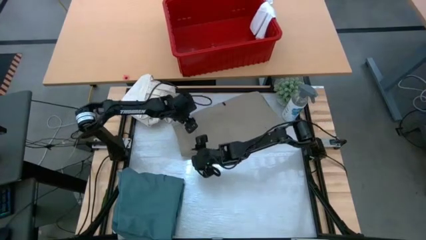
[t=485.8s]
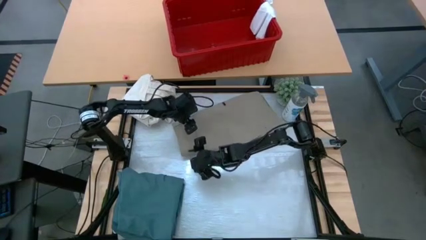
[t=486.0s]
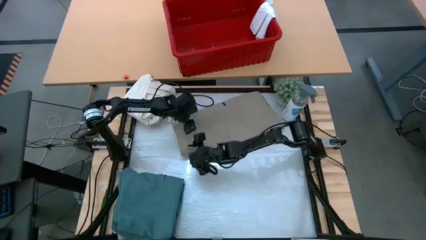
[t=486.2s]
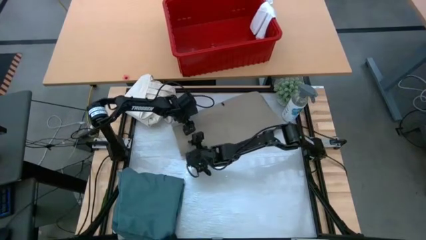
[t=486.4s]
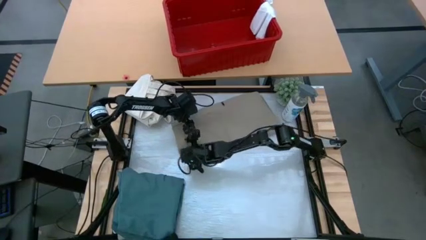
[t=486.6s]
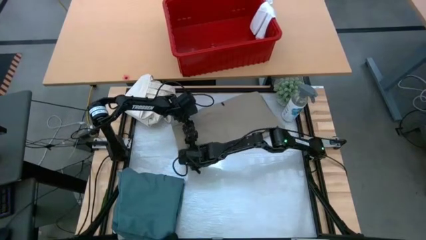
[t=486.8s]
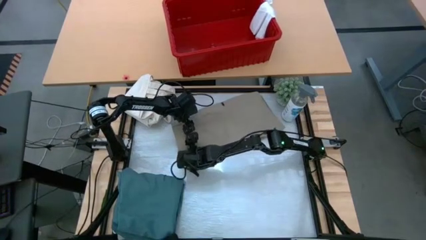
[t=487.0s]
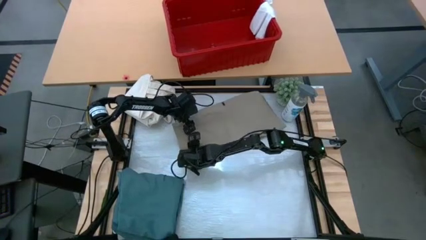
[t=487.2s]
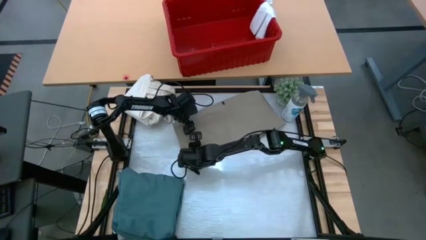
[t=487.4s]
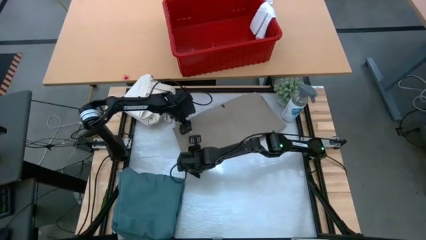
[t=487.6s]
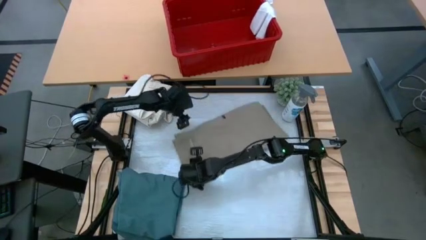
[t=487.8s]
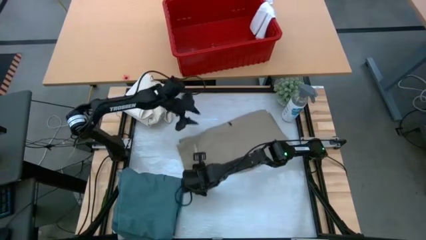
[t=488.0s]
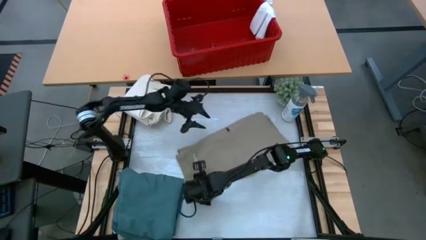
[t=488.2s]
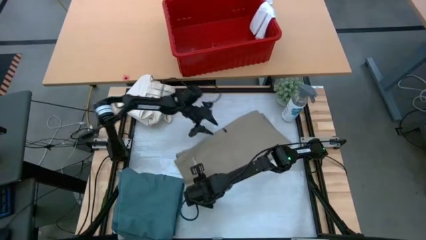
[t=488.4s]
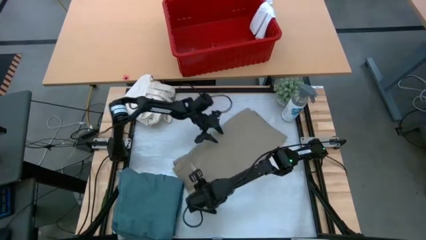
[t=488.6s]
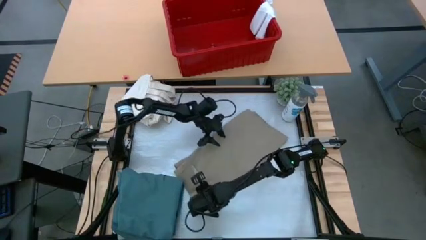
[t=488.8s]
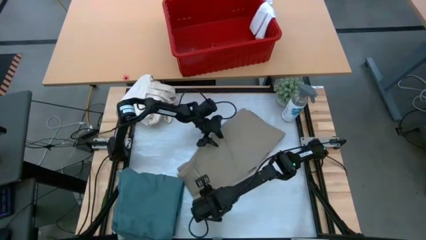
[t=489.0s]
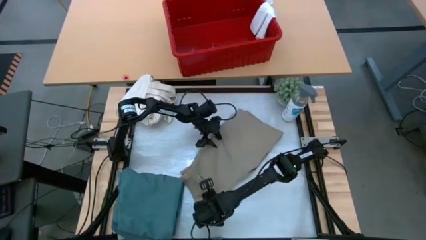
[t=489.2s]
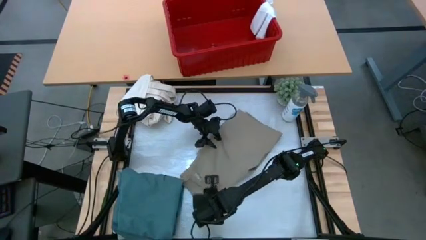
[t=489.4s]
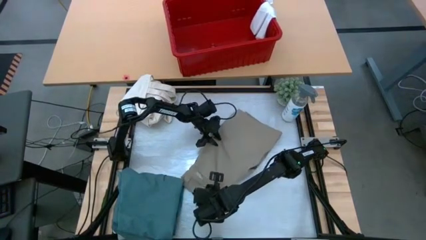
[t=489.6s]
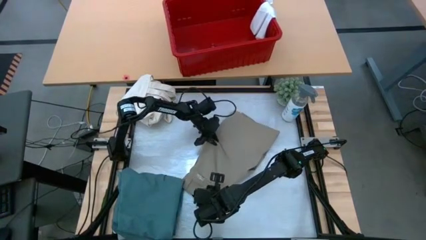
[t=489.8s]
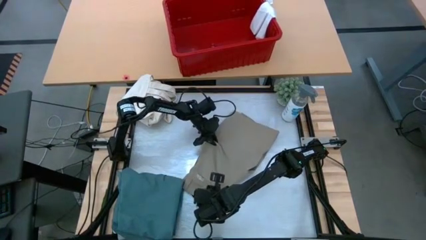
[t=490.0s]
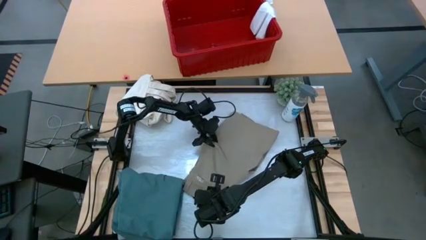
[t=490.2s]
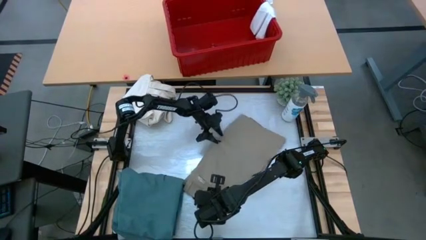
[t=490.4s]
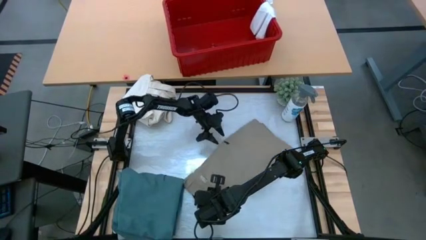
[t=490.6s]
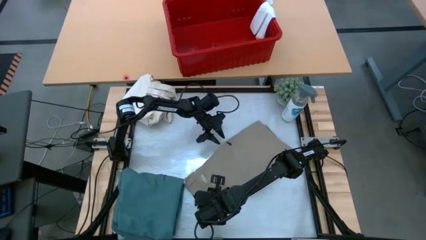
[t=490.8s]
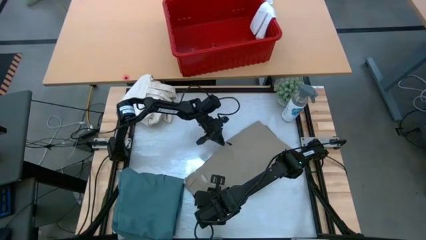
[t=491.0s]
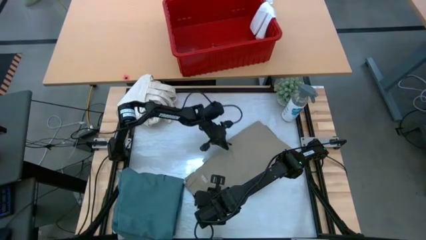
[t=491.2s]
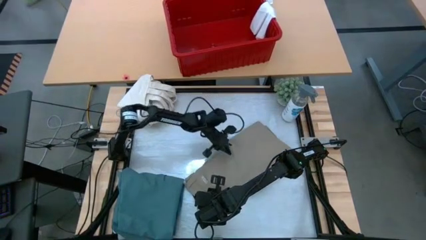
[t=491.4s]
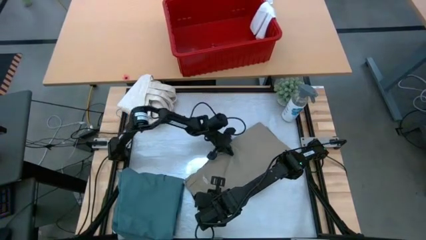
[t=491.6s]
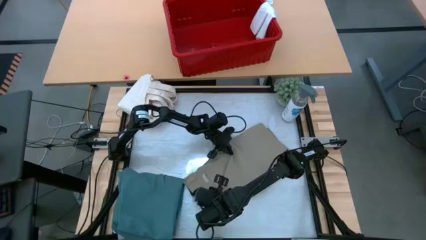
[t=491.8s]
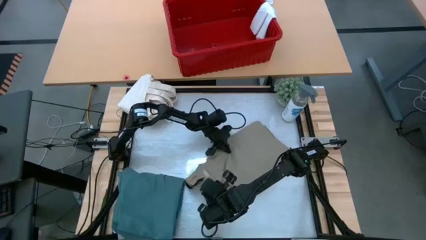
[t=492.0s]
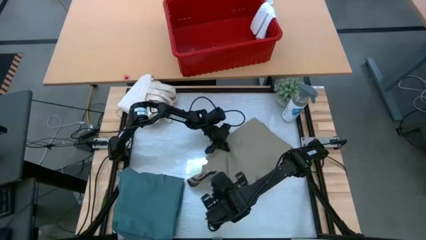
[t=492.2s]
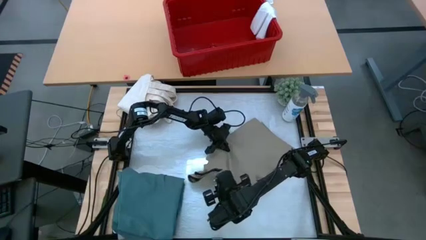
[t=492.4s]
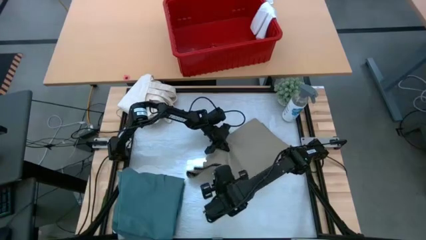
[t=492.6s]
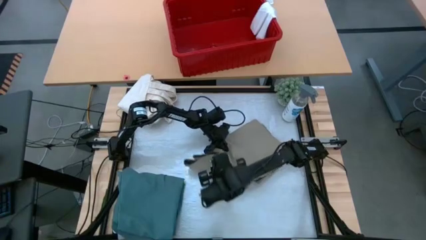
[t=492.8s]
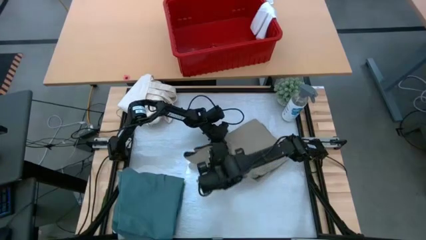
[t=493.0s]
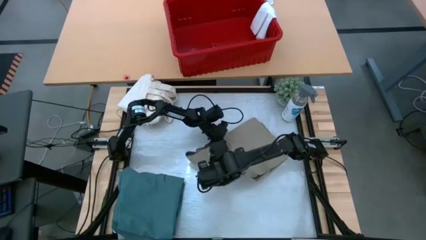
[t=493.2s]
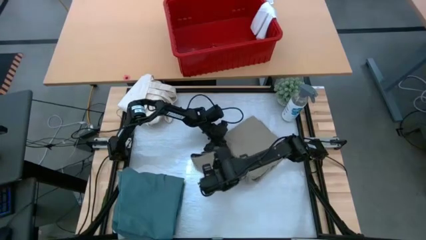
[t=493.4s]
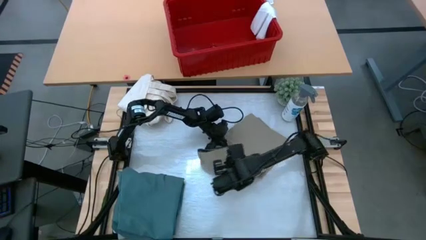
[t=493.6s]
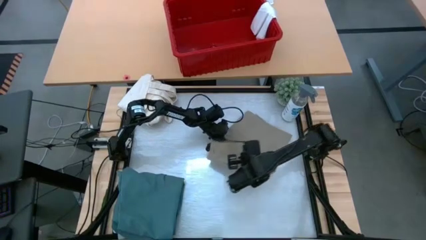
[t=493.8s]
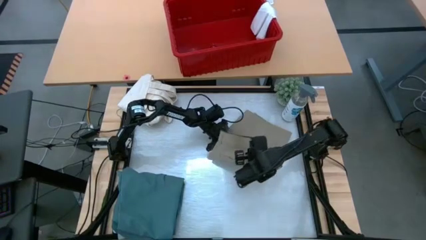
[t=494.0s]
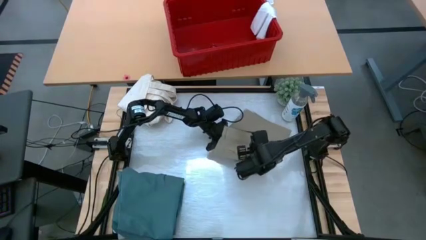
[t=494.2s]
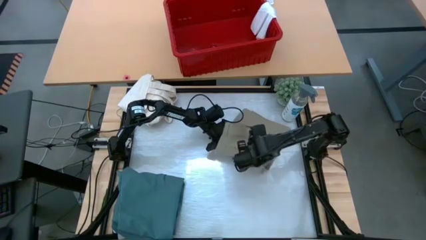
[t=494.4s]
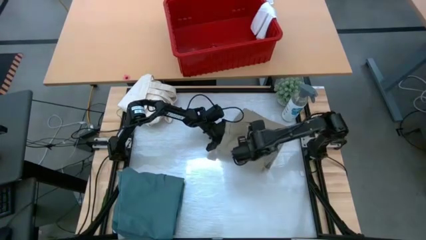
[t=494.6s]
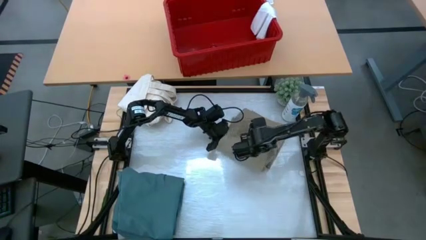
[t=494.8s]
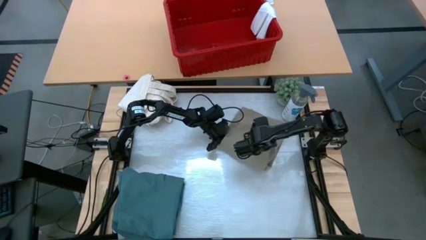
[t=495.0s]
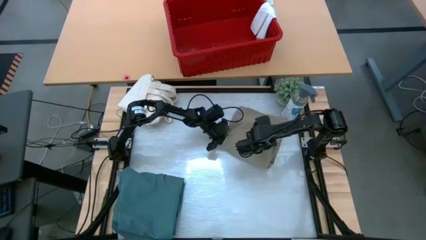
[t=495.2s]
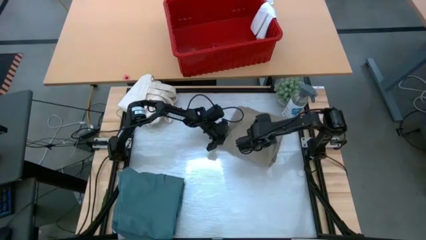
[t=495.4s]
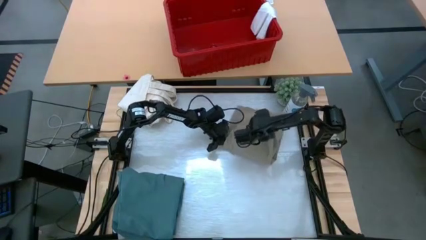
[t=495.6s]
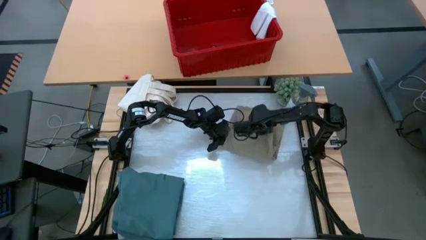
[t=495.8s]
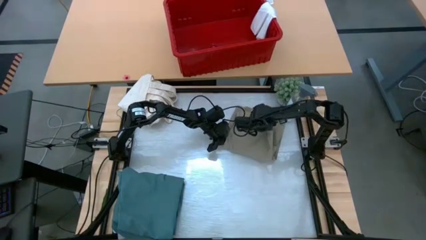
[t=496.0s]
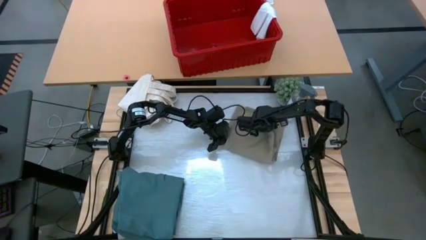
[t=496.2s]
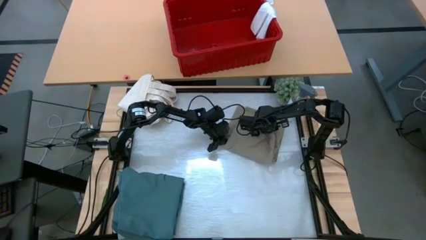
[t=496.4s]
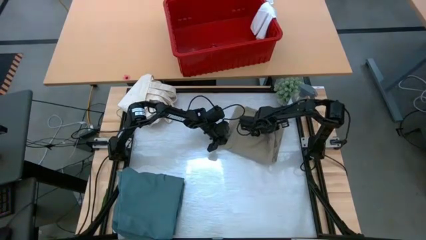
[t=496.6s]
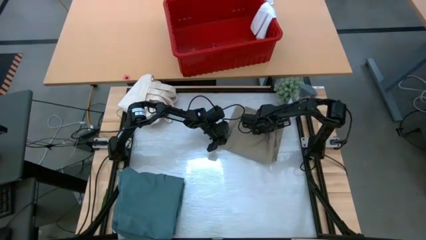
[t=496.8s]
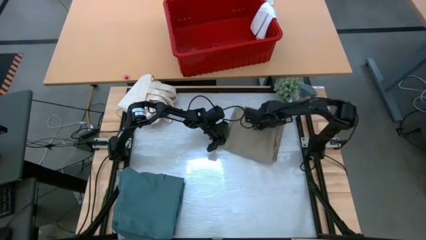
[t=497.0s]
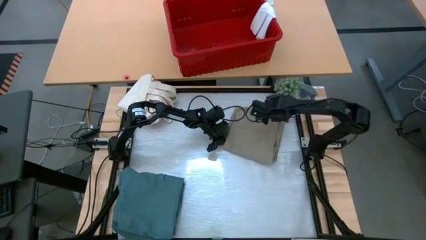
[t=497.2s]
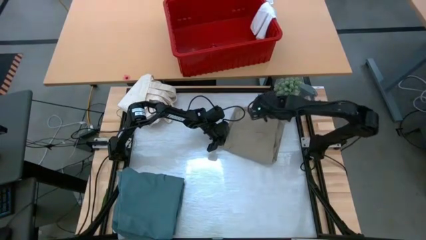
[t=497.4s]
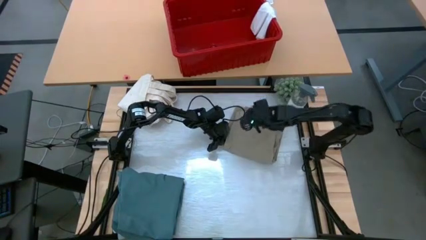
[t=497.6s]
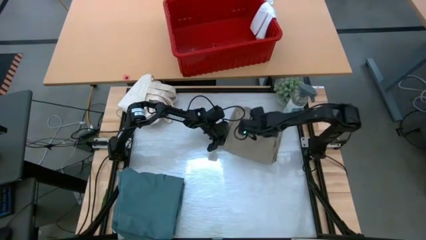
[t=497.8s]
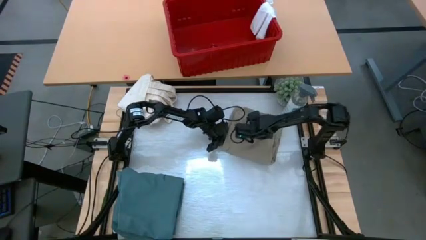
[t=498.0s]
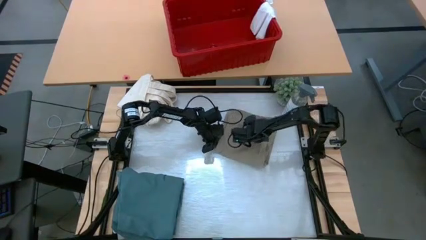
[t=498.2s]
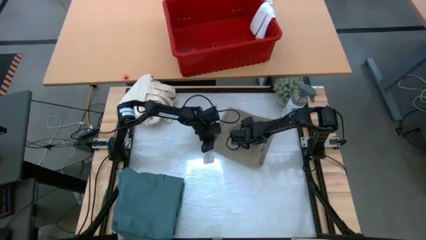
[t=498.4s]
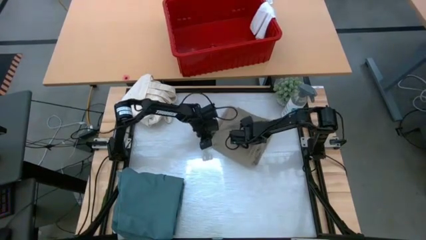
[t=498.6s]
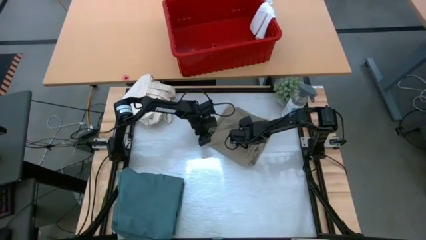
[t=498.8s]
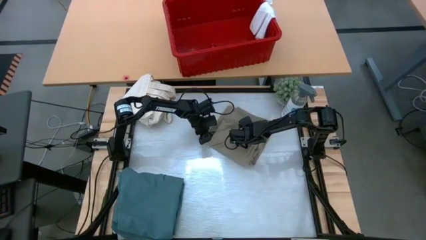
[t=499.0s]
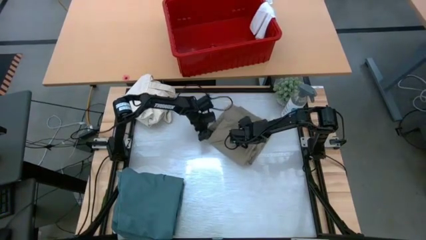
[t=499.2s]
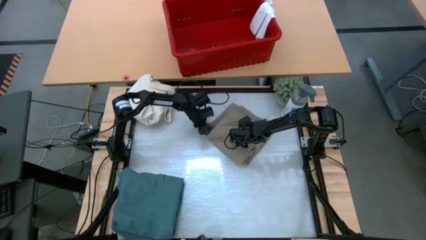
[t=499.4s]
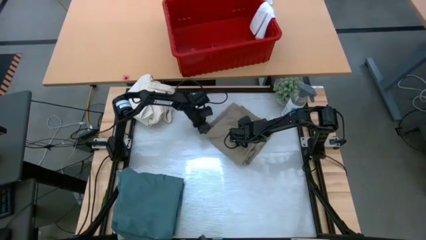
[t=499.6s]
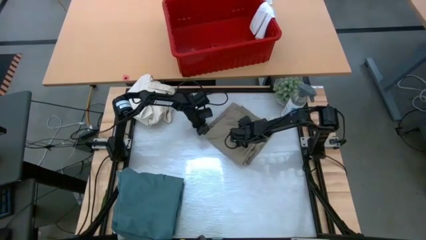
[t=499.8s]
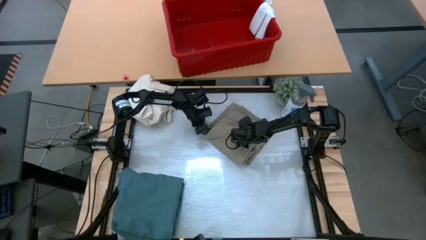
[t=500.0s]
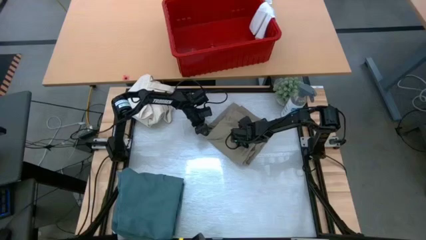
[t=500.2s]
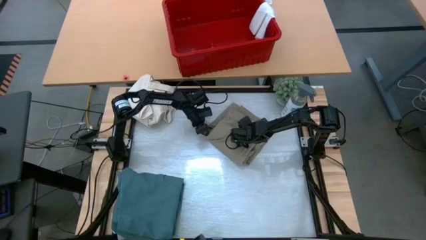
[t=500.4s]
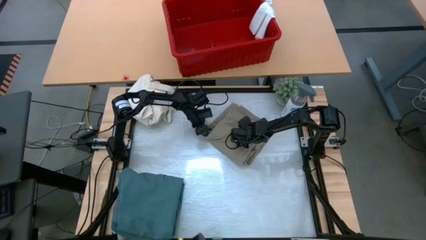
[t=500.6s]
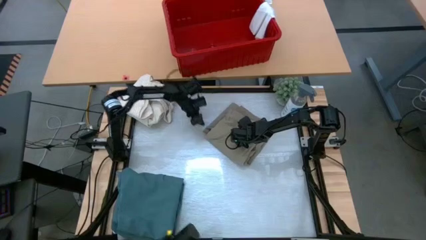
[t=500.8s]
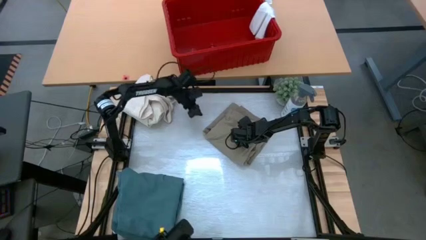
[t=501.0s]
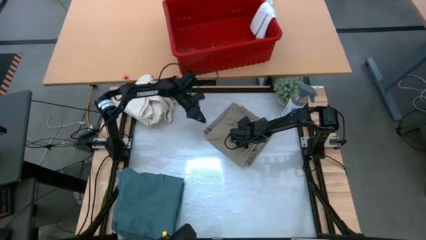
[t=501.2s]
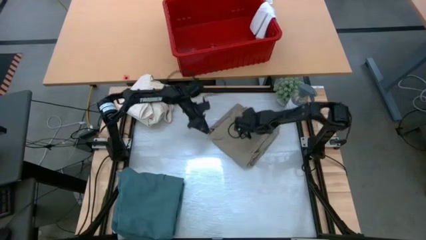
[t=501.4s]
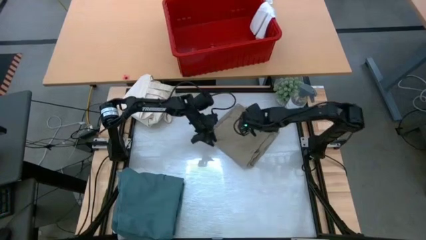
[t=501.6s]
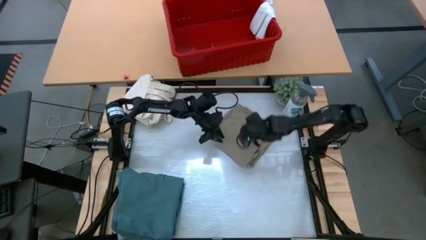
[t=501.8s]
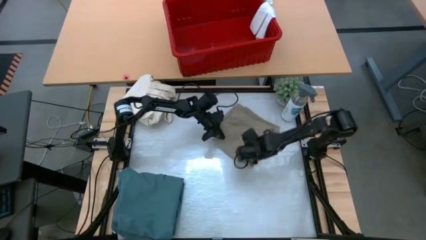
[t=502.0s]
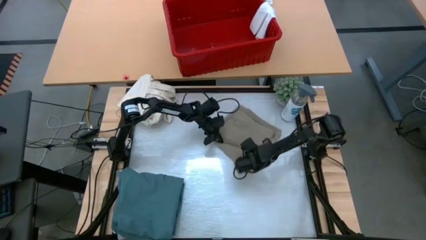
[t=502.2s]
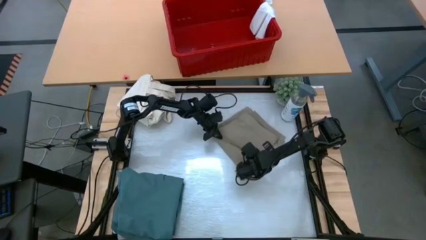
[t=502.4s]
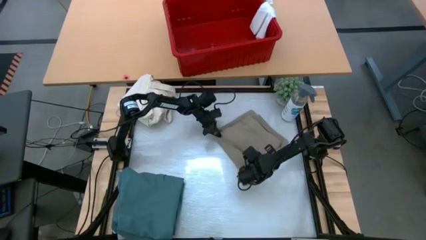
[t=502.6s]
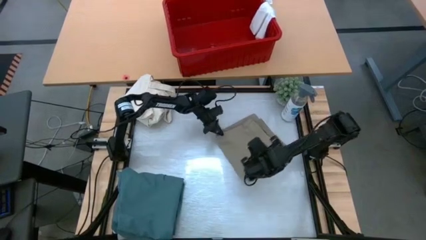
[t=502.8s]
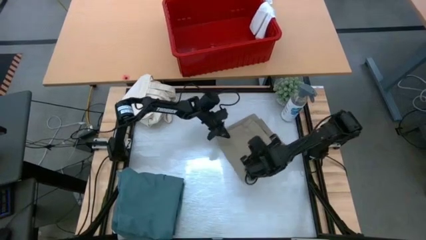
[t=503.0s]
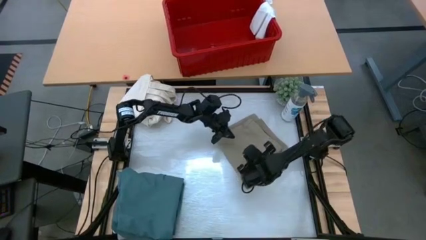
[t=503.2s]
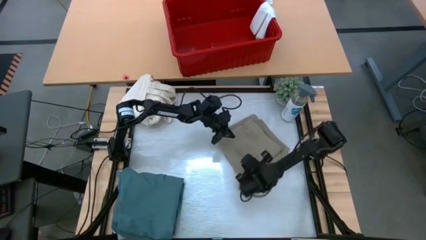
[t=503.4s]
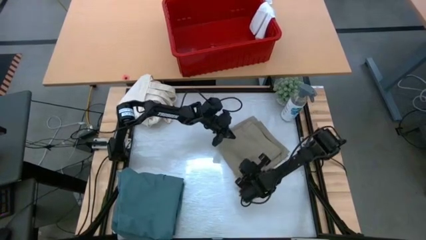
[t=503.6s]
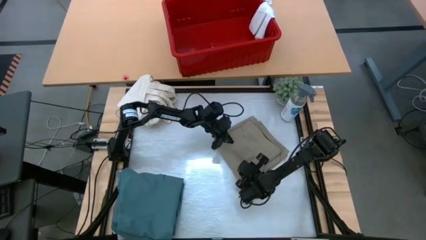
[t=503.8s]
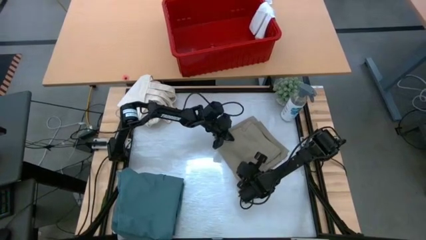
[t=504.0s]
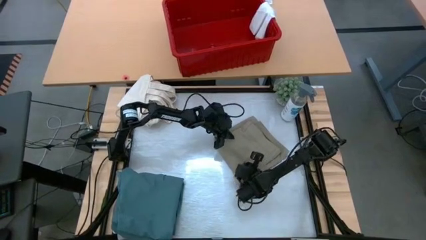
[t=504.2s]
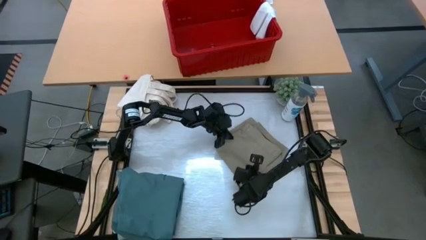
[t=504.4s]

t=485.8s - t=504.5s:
Task: Fold Laundry from Bin
Fold the brown shorts
